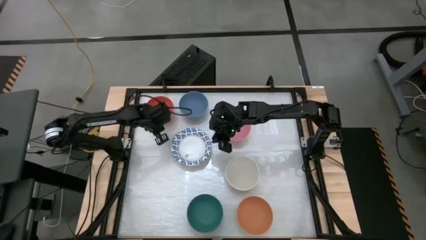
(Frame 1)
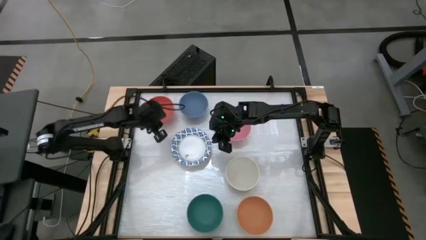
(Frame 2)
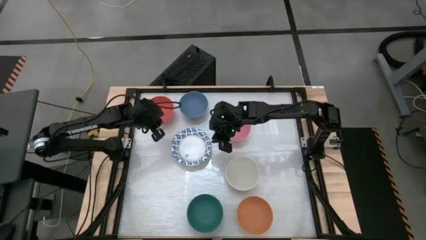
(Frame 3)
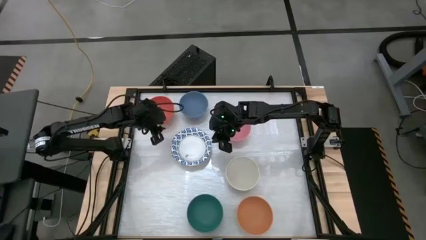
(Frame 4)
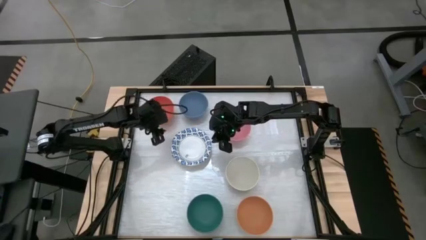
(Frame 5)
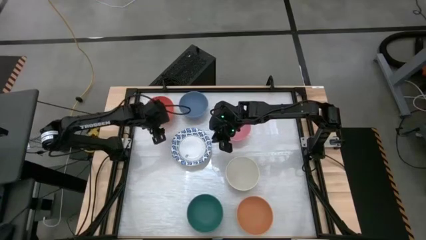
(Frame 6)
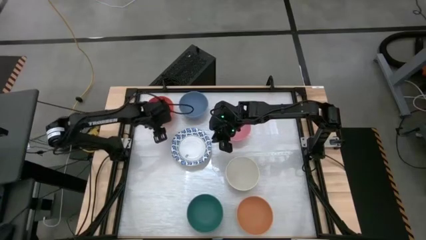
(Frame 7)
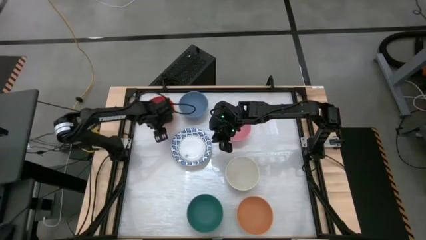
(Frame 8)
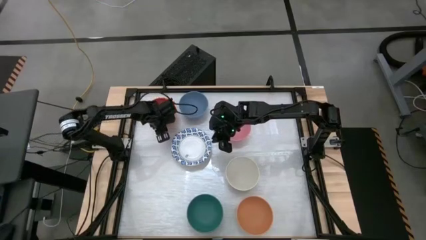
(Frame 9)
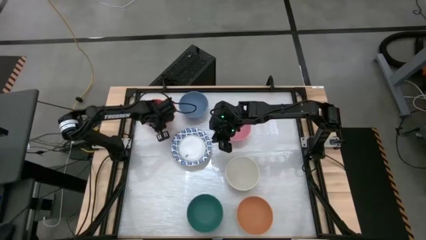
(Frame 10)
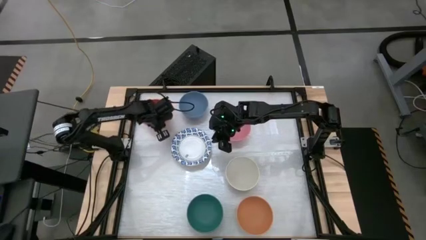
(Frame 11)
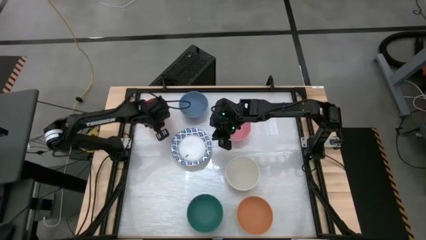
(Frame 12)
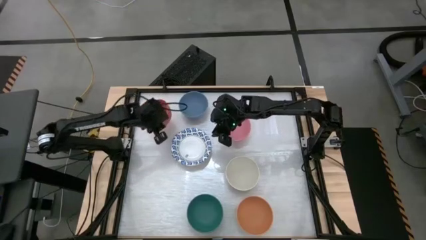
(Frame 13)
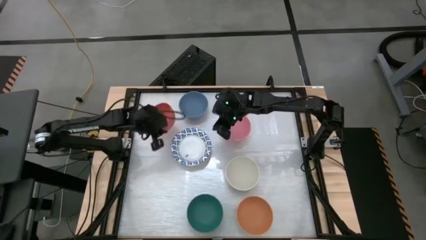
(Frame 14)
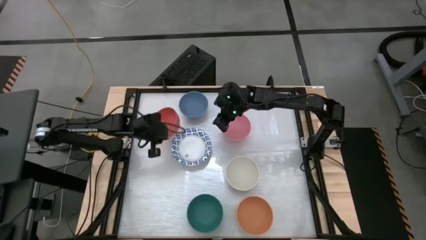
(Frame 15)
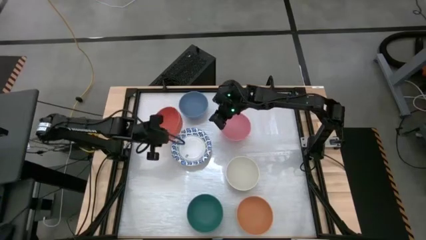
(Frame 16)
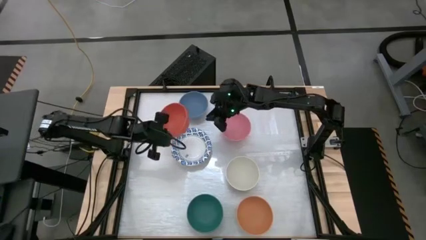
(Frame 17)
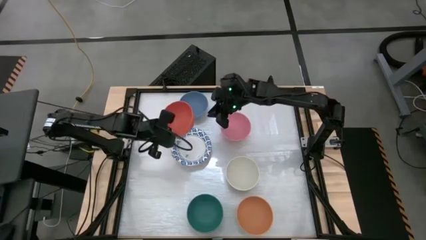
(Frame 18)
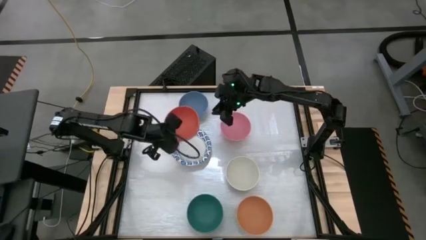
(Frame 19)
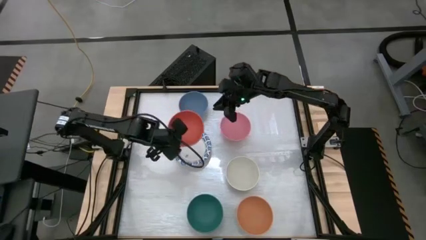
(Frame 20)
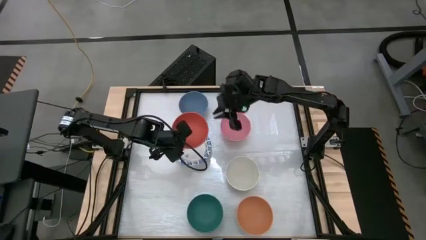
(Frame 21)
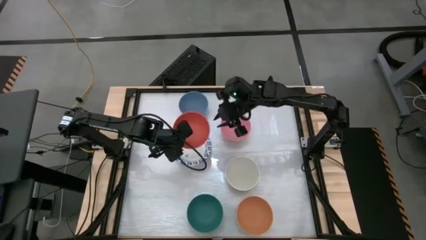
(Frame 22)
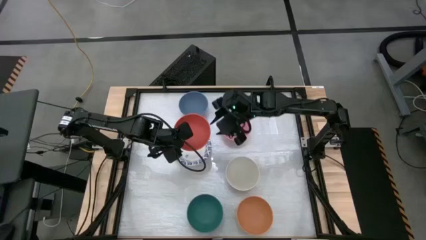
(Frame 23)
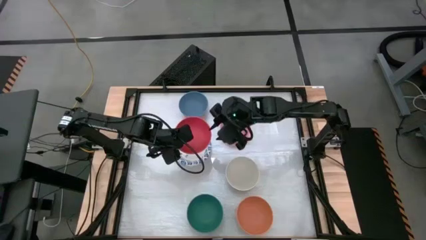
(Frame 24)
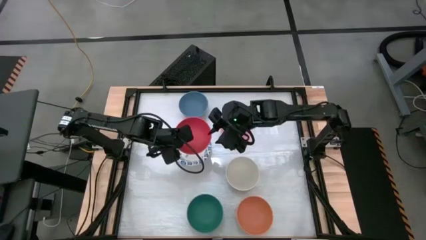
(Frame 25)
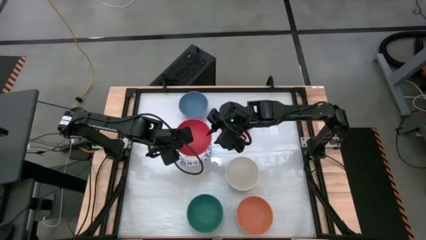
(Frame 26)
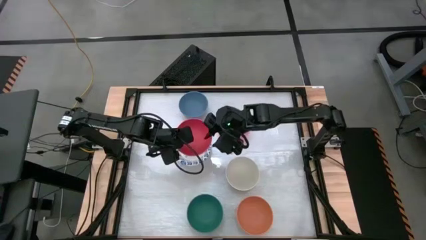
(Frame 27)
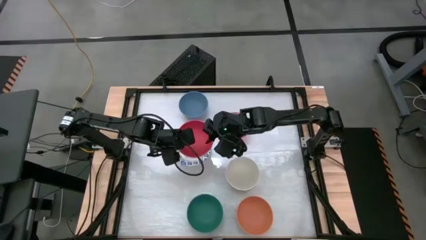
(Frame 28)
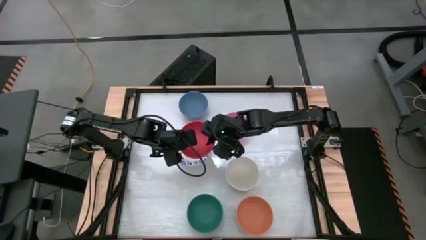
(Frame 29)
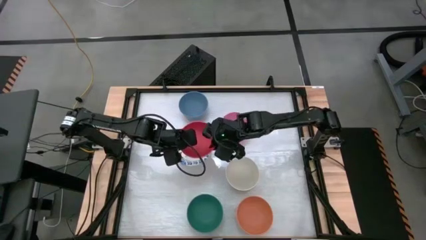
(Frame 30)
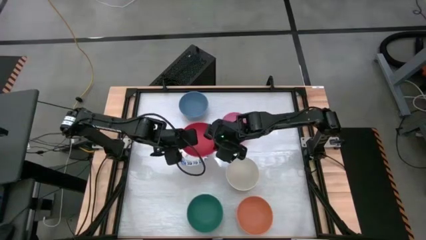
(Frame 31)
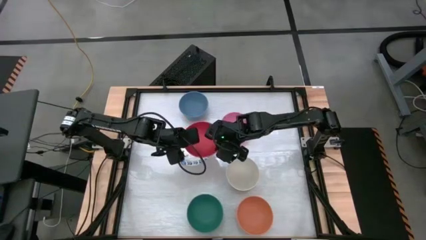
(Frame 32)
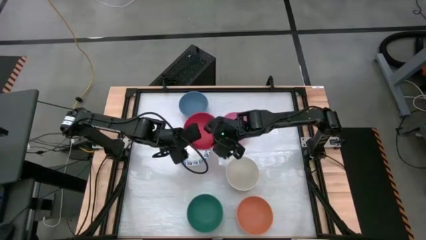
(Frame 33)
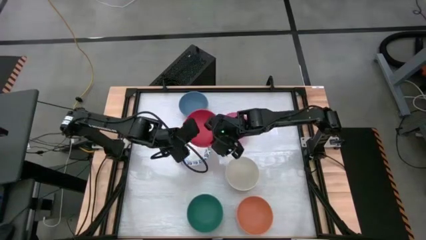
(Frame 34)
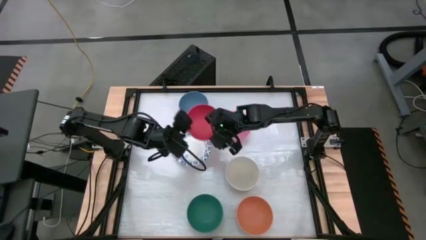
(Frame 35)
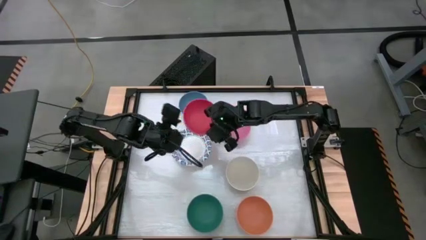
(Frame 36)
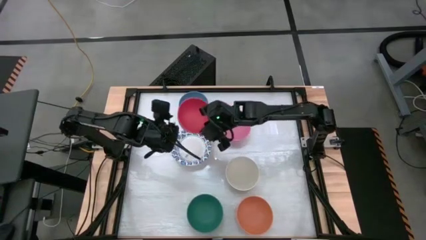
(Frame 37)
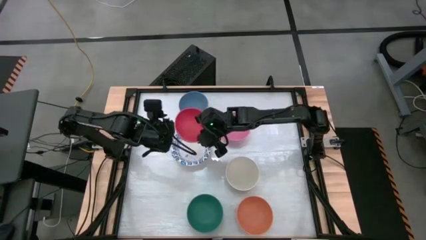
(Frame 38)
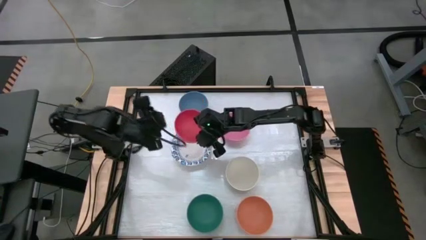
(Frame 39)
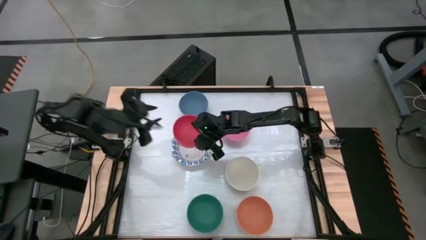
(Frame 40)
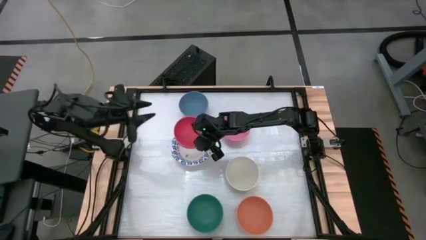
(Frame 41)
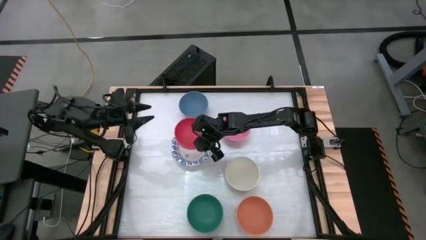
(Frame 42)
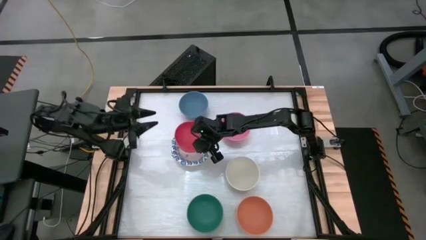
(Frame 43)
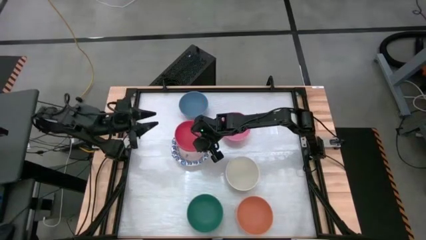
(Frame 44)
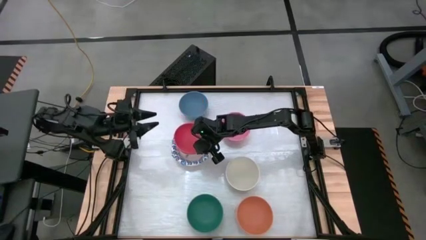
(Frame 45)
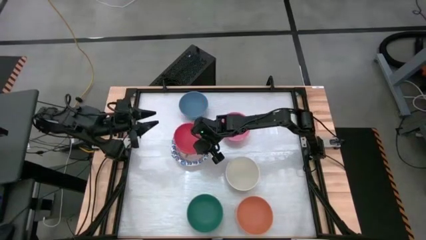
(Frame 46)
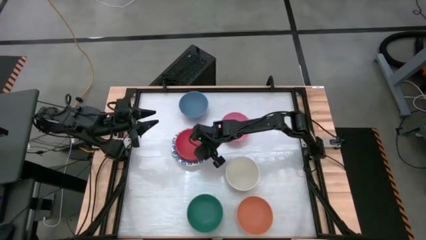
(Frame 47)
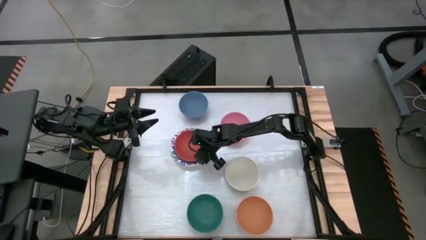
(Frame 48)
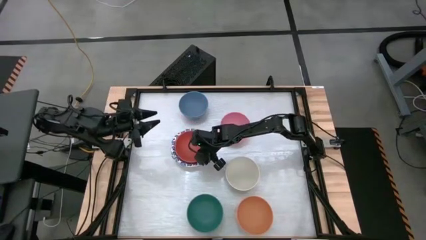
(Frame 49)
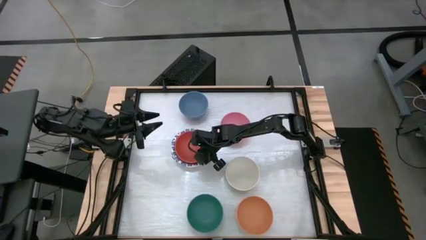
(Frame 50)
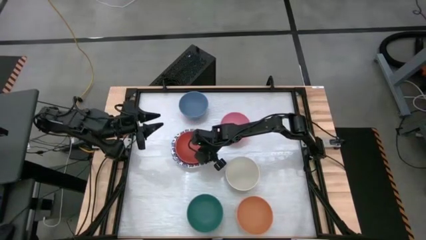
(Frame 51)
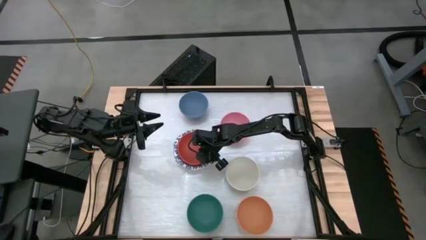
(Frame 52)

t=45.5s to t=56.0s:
Stack the red bowl on top of the blue patterned bowl
